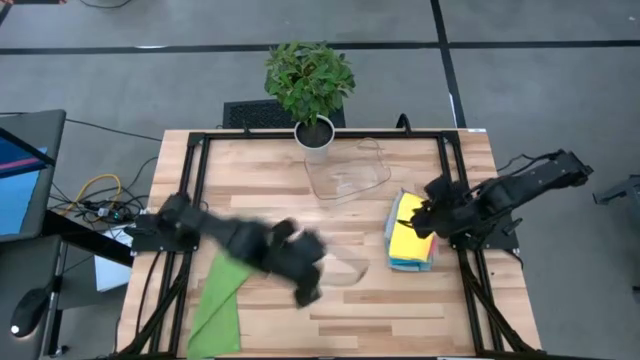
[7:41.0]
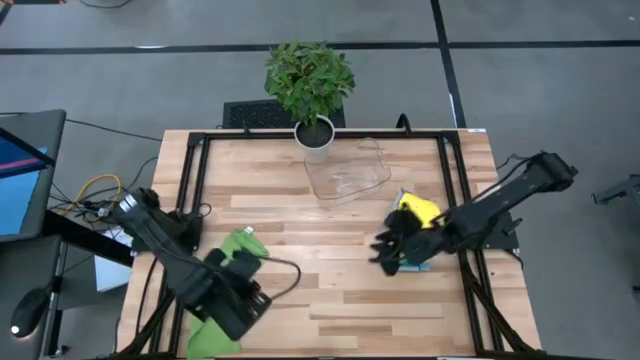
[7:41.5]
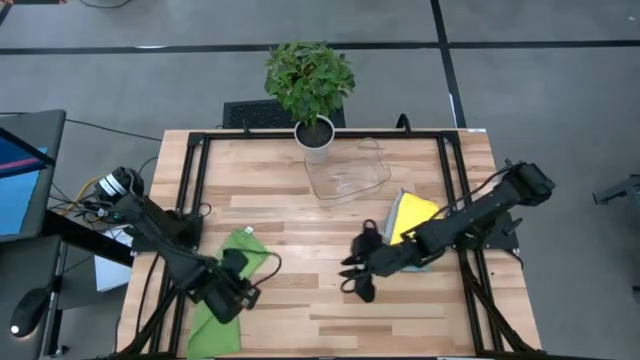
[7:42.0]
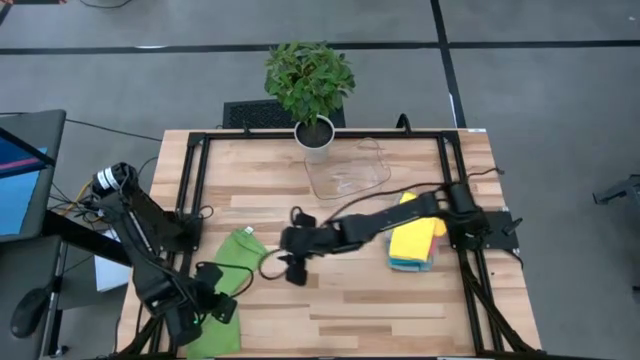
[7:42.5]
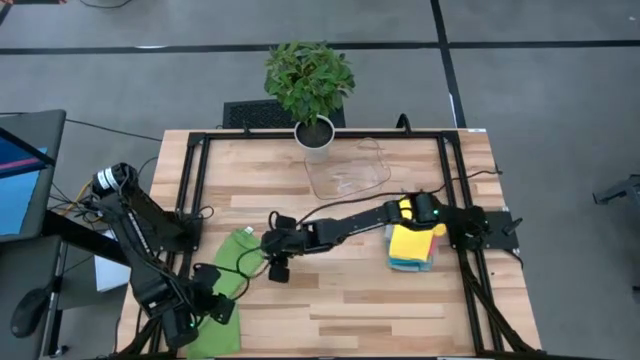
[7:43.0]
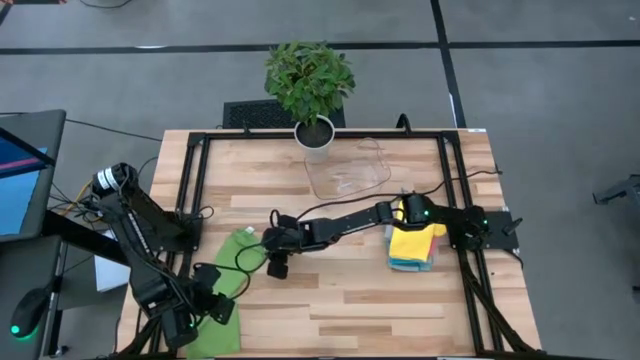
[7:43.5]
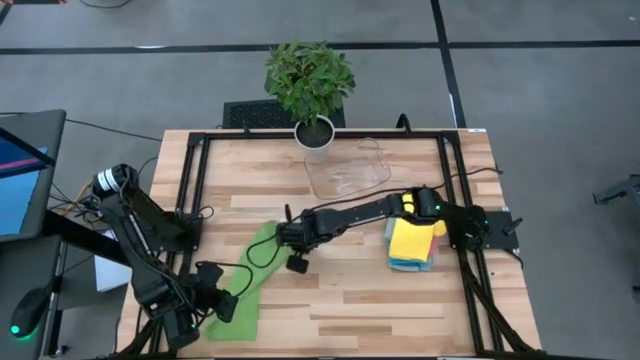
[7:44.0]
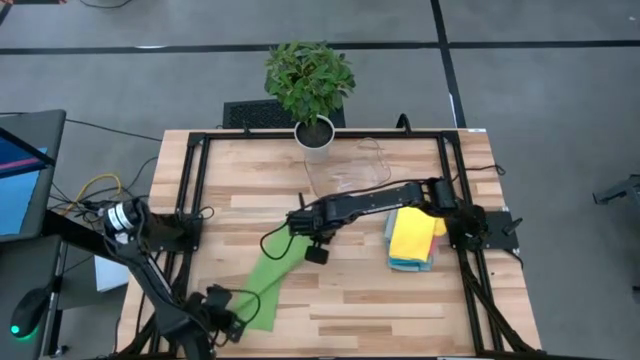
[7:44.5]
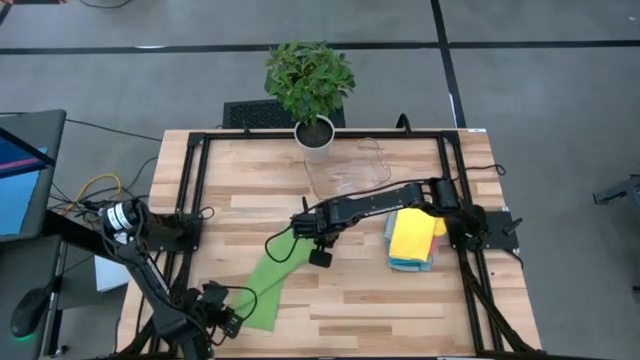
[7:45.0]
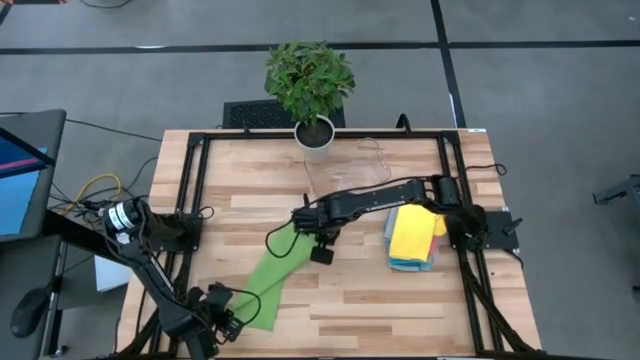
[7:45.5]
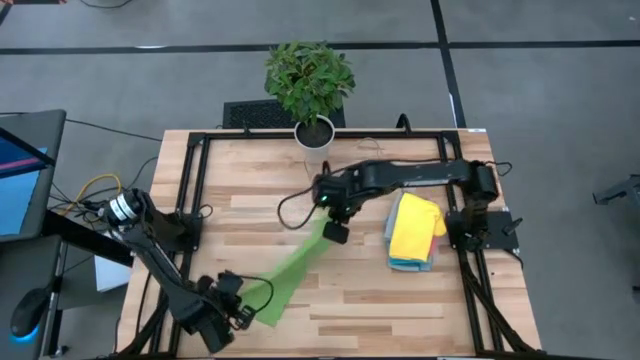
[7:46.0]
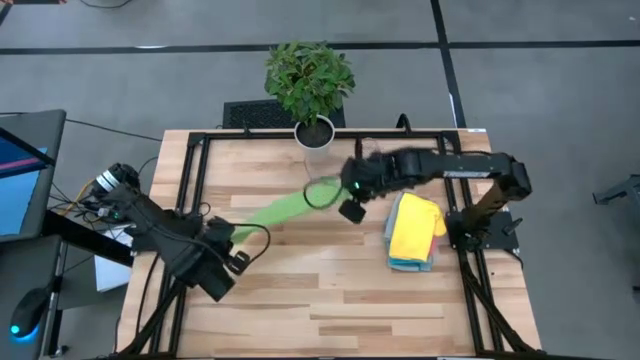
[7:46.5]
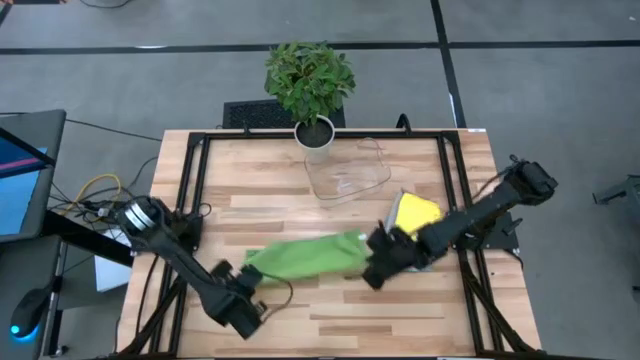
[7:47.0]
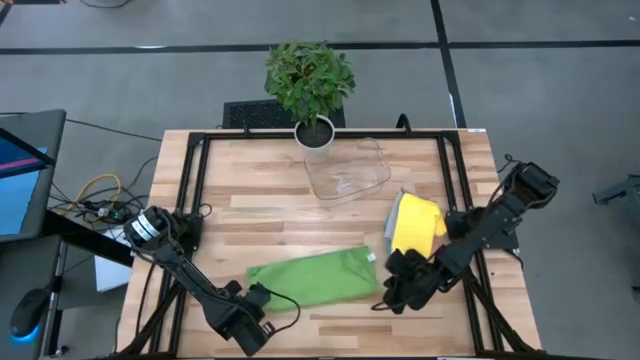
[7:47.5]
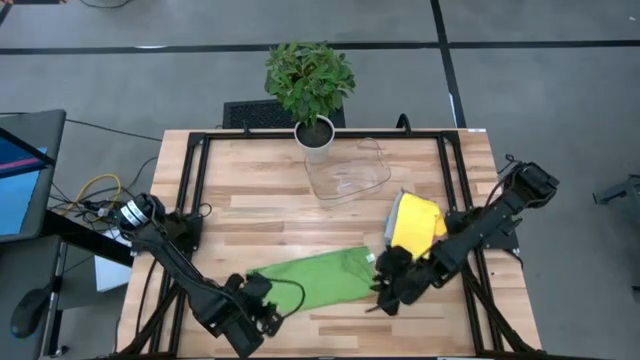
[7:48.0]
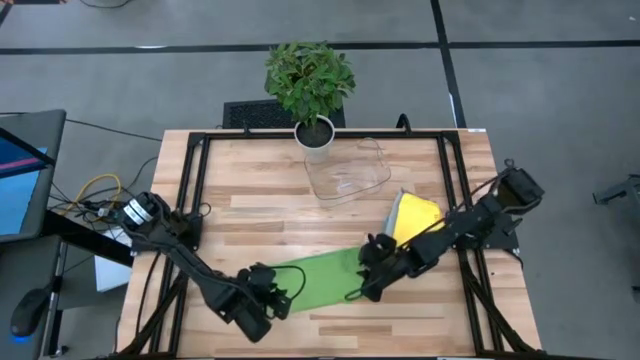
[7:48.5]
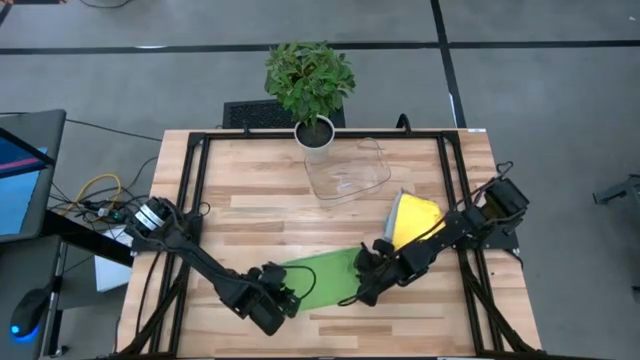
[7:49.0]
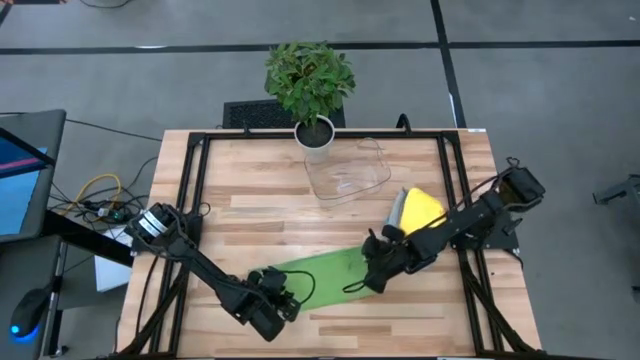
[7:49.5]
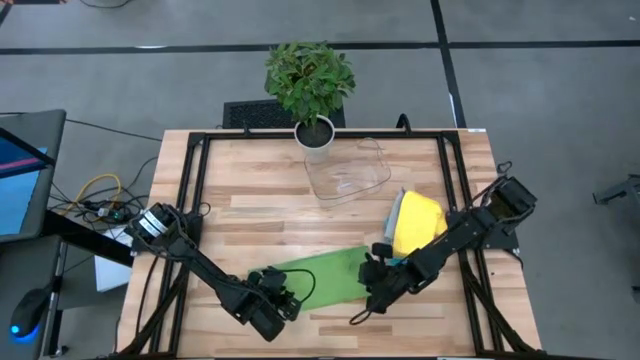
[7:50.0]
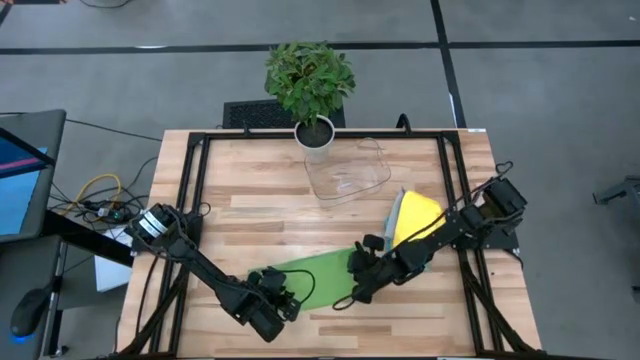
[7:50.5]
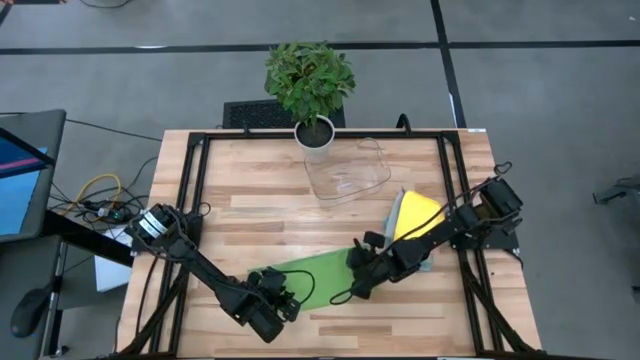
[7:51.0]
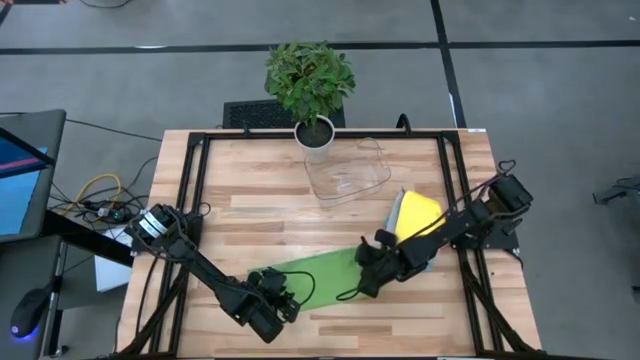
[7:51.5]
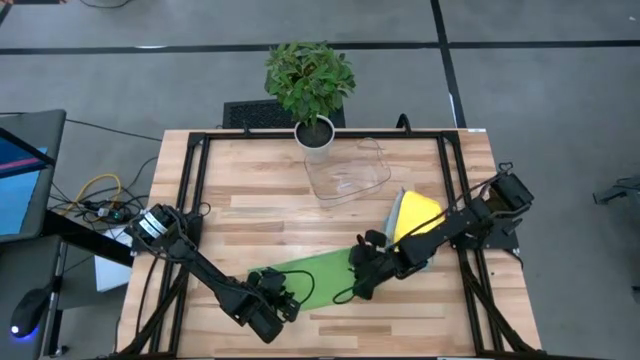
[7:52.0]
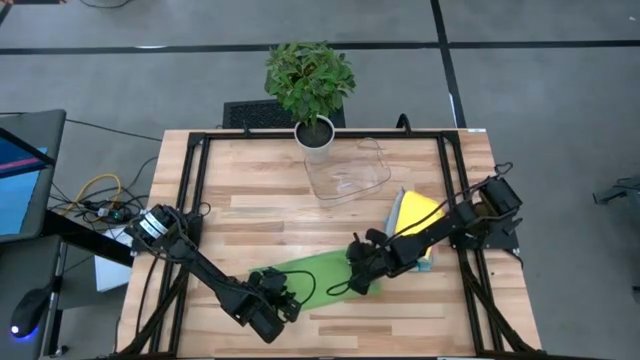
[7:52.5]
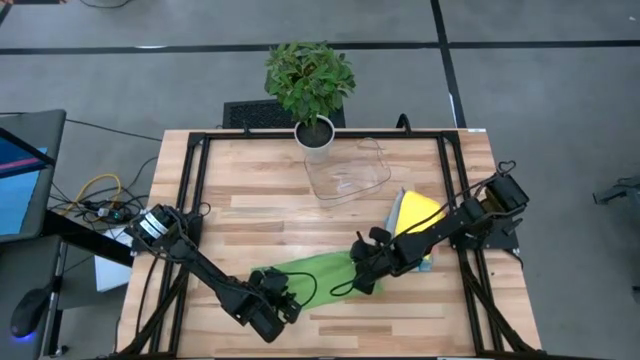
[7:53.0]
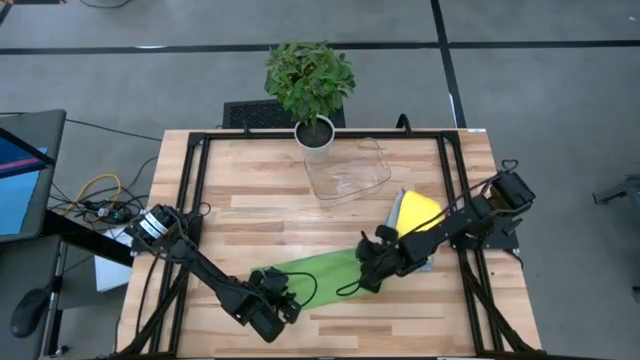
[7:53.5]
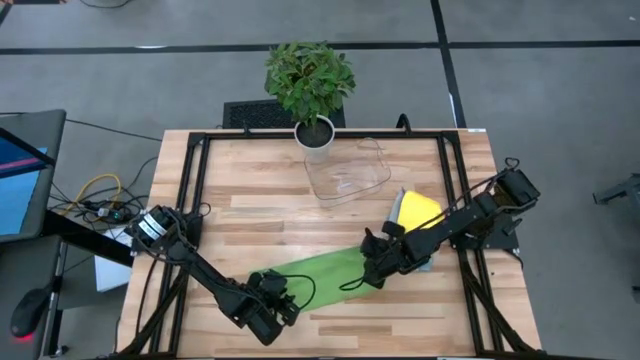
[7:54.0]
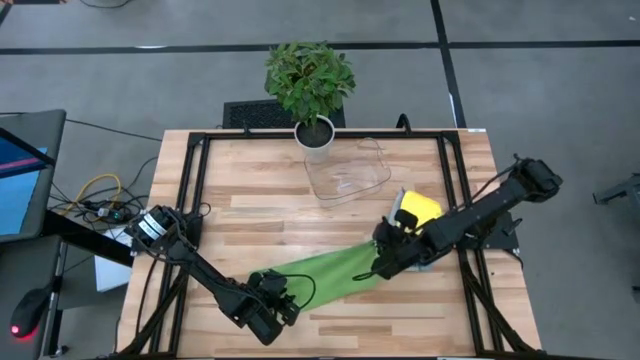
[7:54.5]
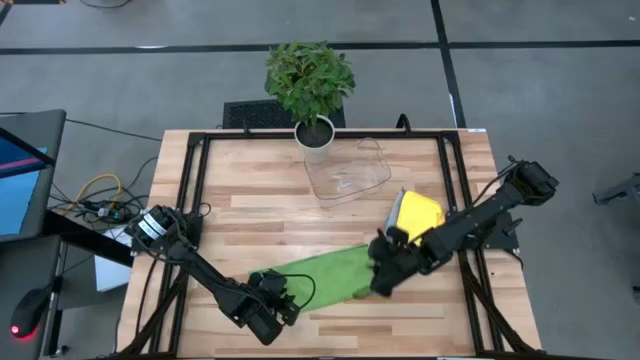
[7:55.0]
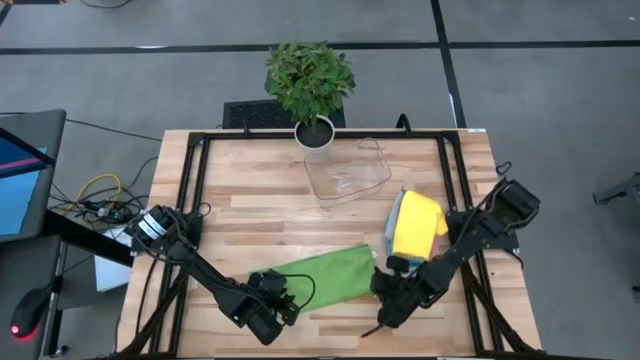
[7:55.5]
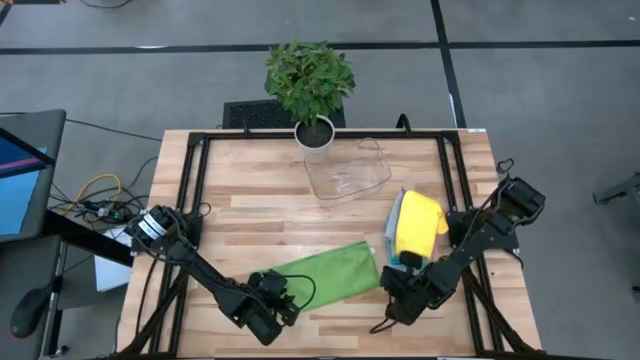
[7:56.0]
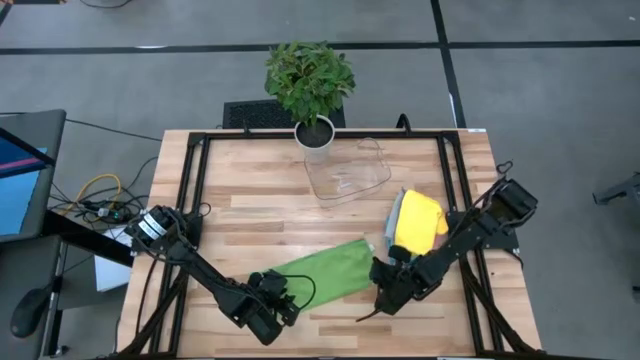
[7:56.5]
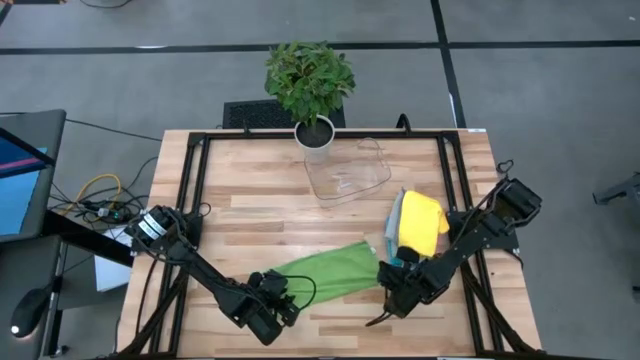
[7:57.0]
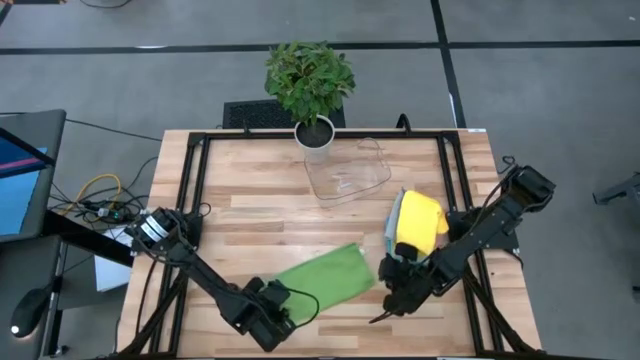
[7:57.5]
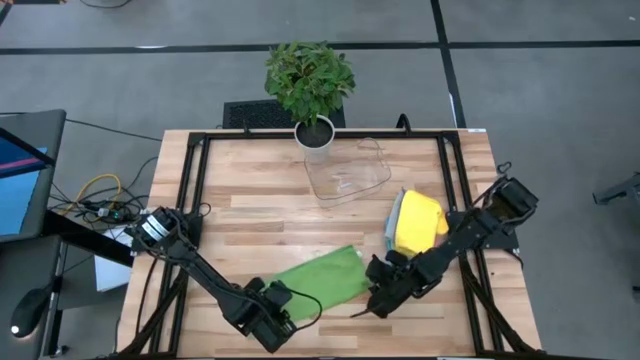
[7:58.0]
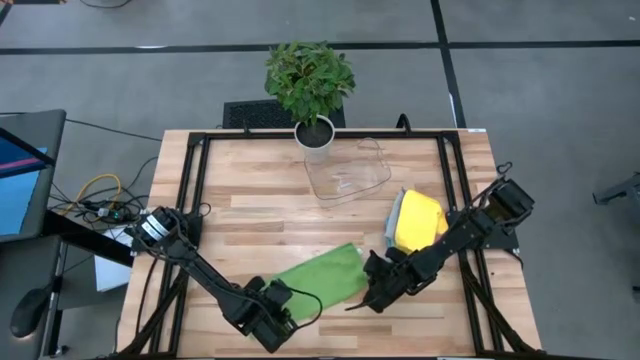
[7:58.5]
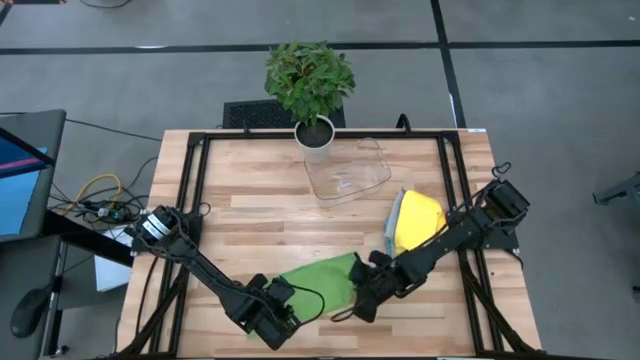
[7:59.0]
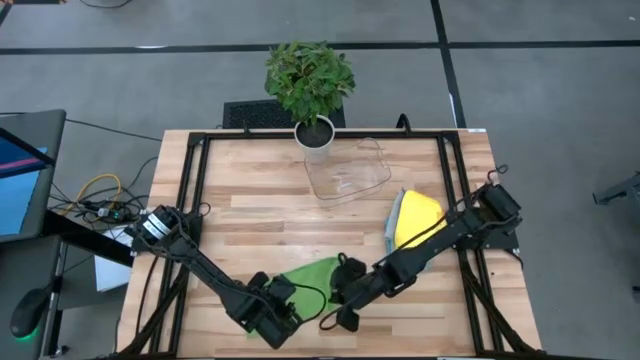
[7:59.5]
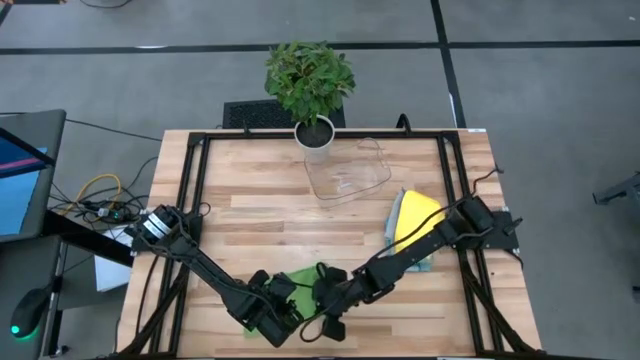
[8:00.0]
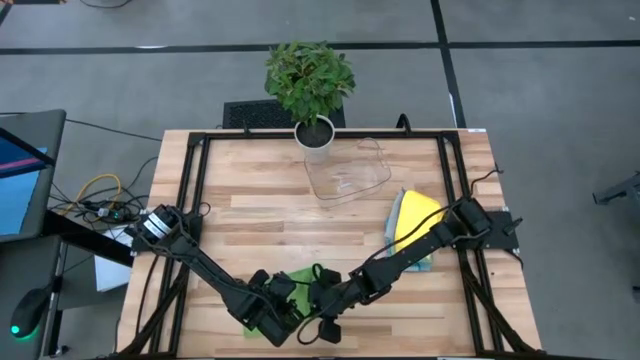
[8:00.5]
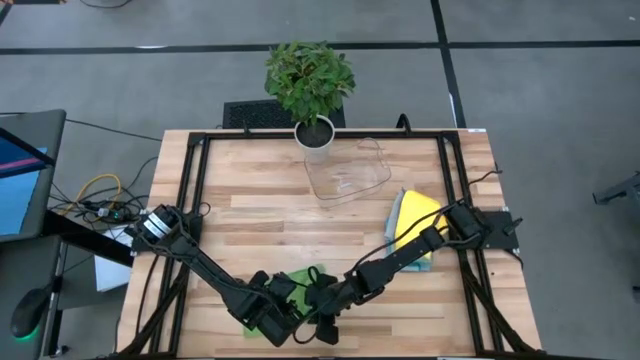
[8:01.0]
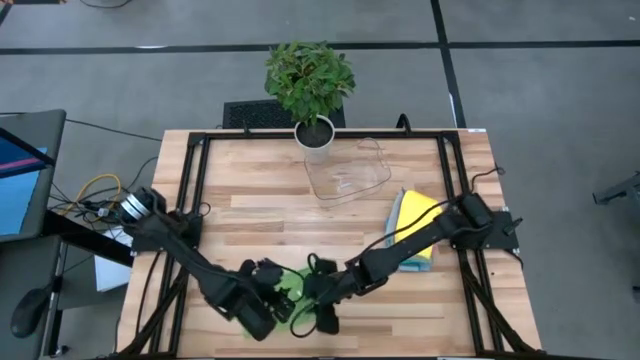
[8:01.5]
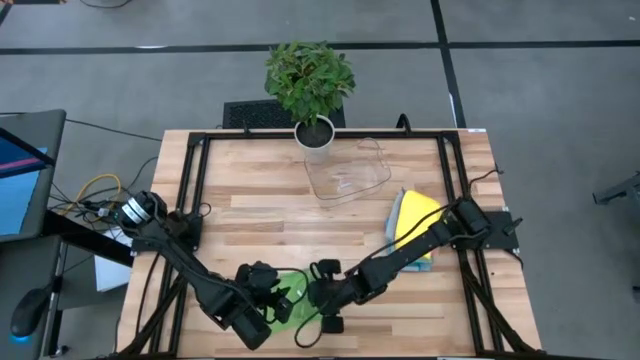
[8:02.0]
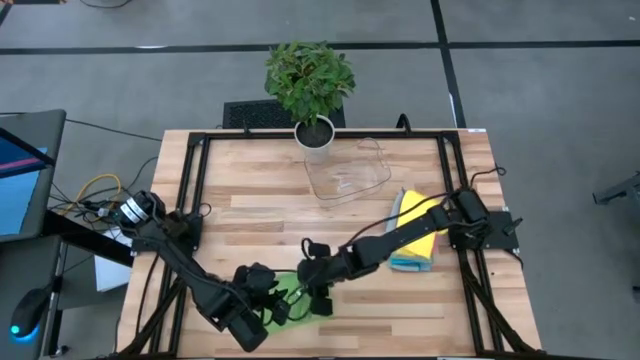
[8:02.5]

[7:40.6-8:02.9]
Task: Fold microfiber towels
Fold the green microfiber cloth
